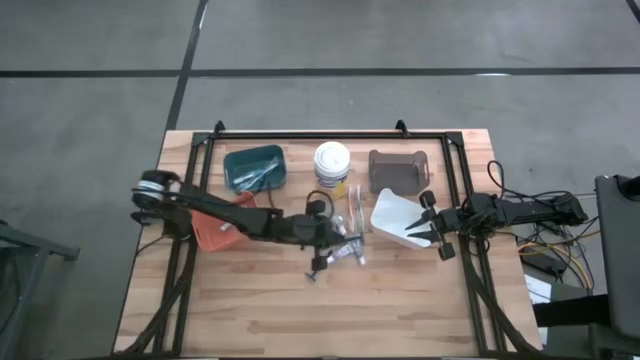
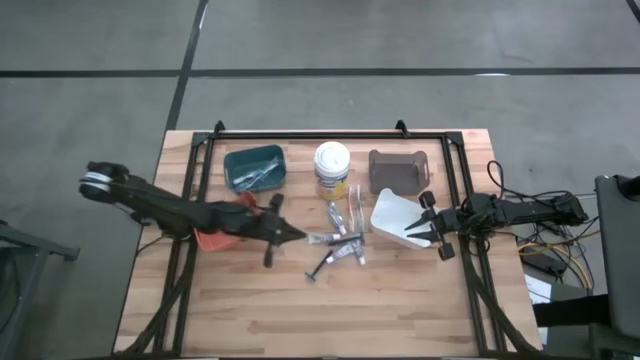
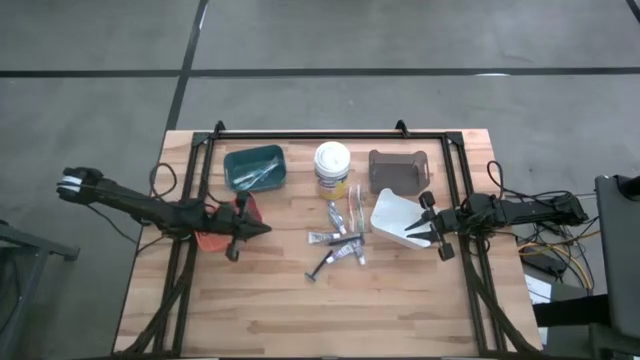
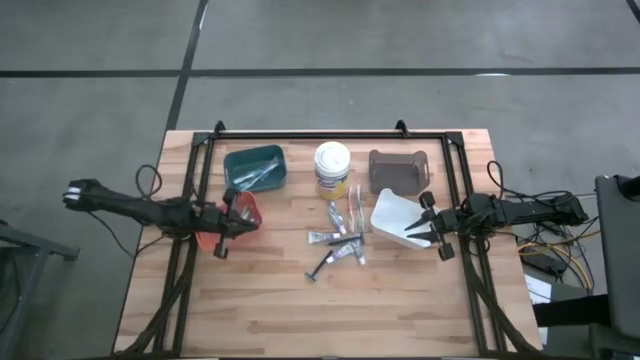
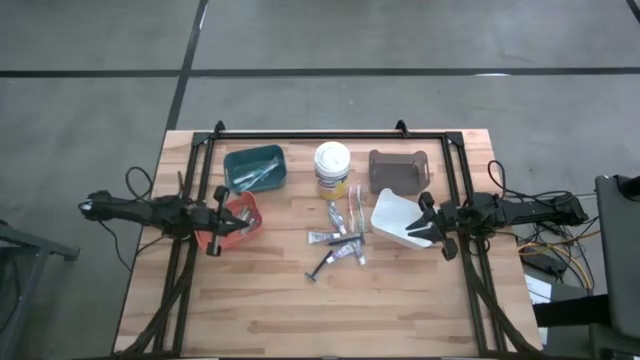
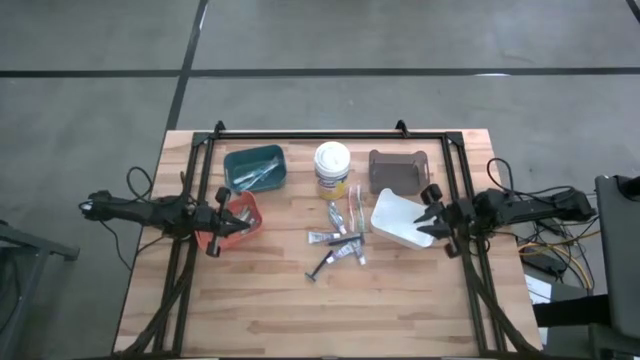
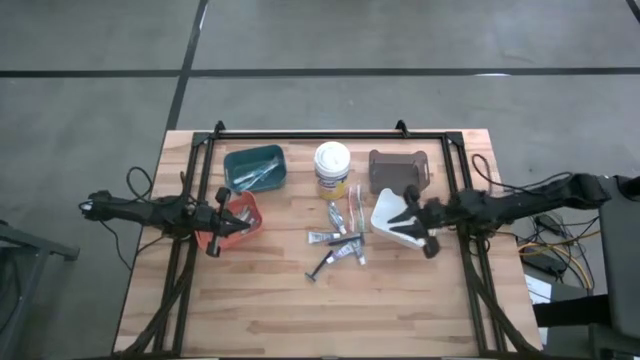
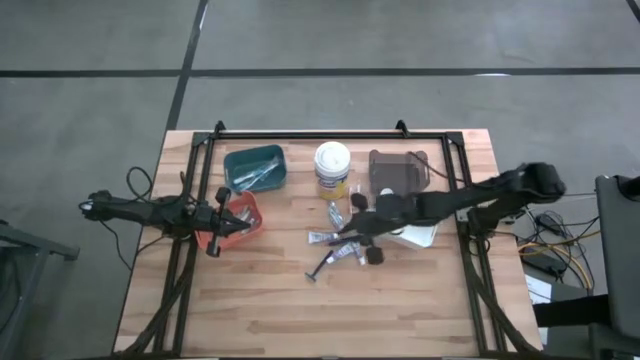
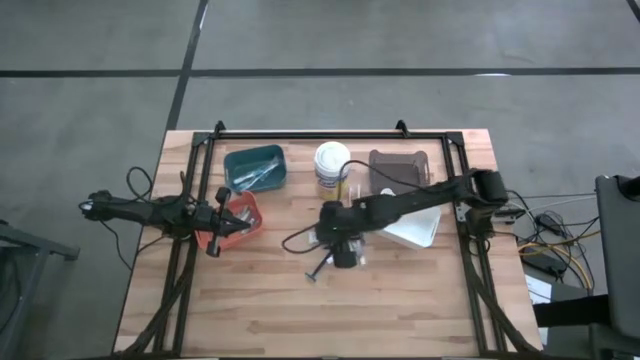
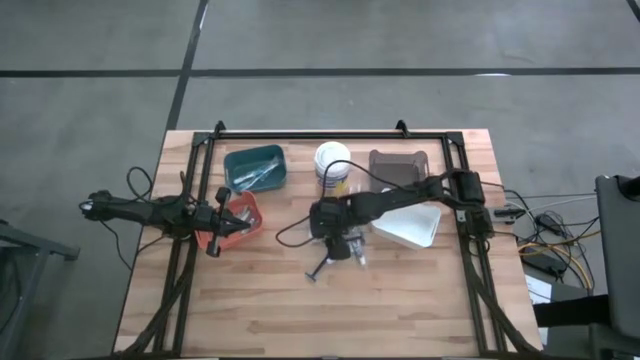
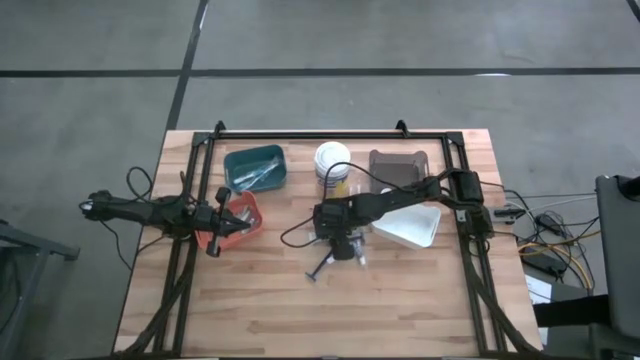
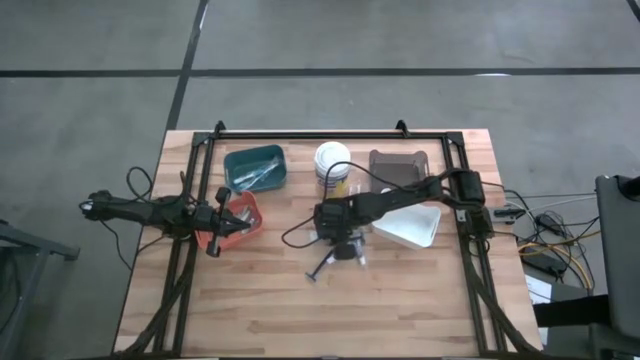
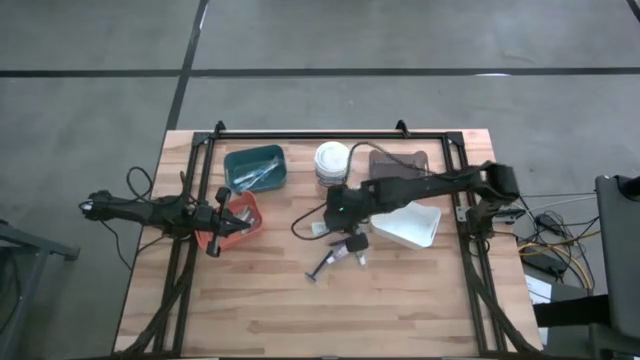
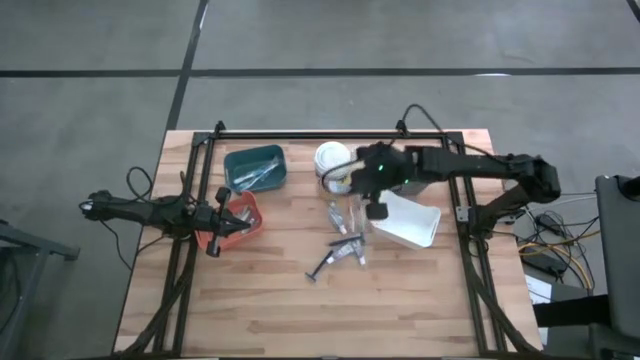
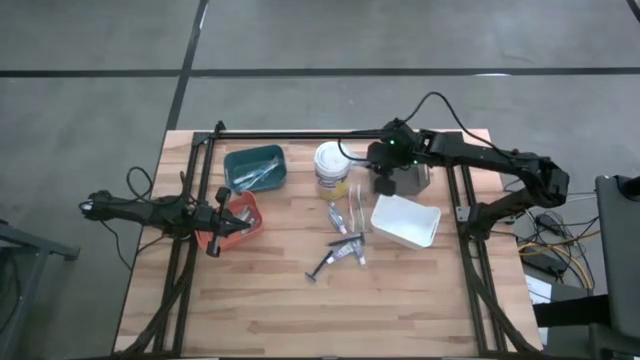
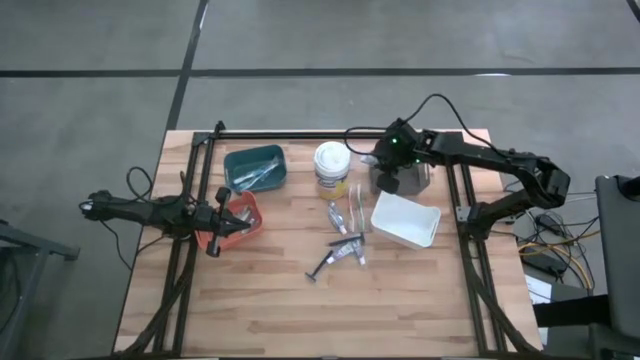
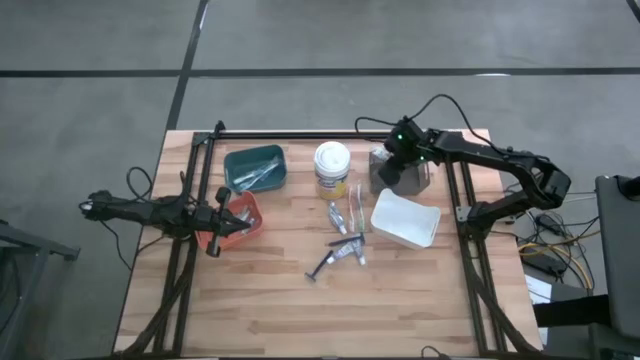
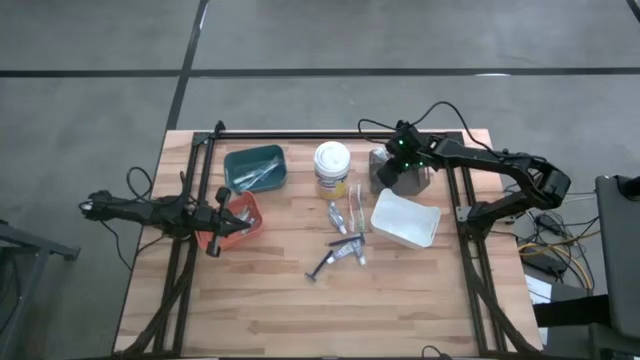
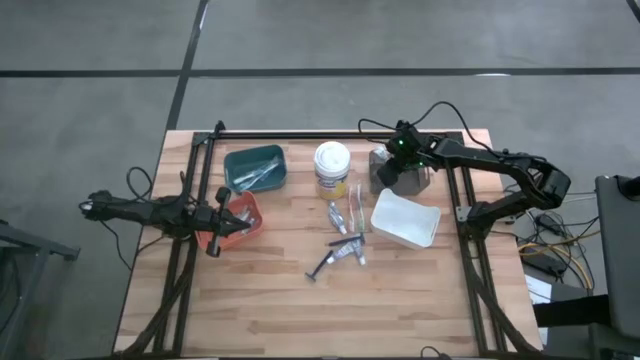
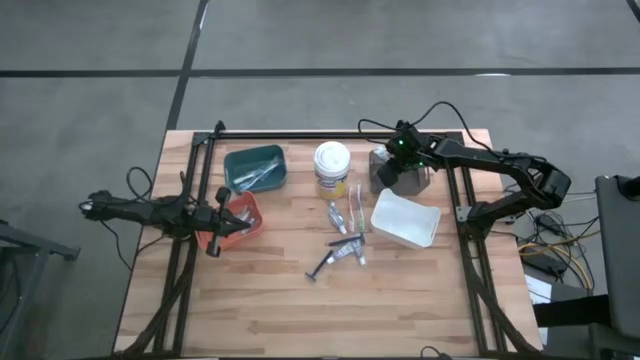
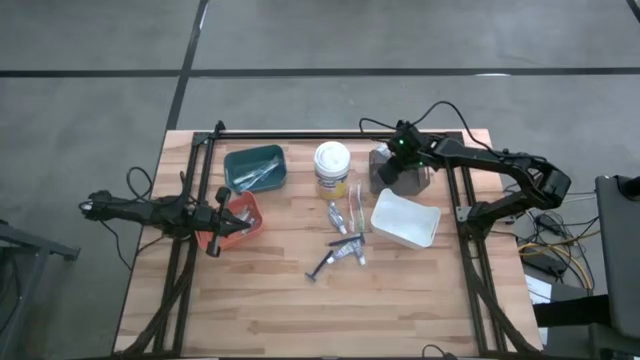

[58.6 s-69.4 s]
Task: Pick & Place Travel size toiletries
Put the toothpaste into the black bin

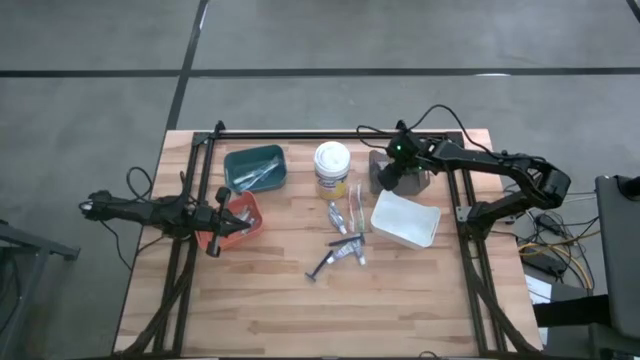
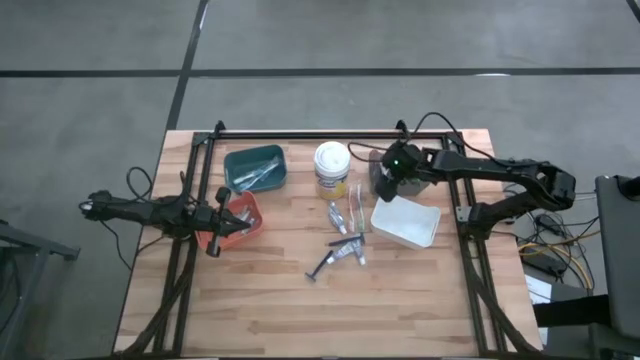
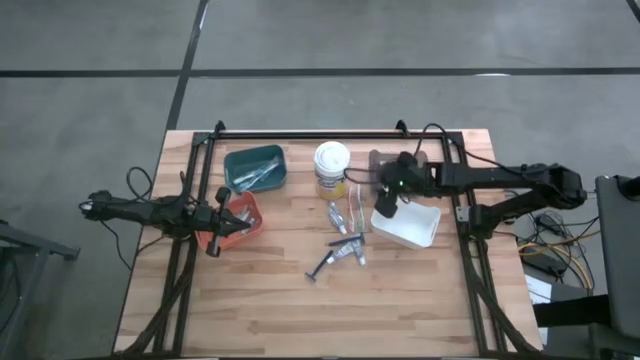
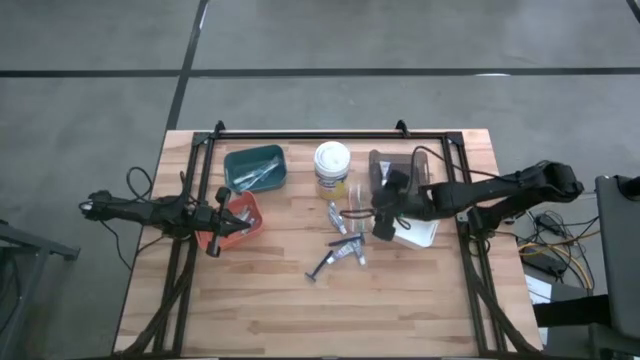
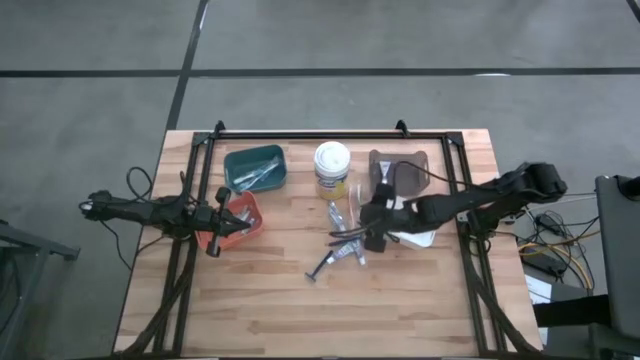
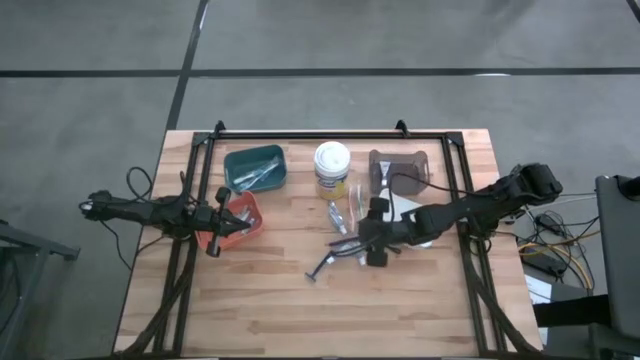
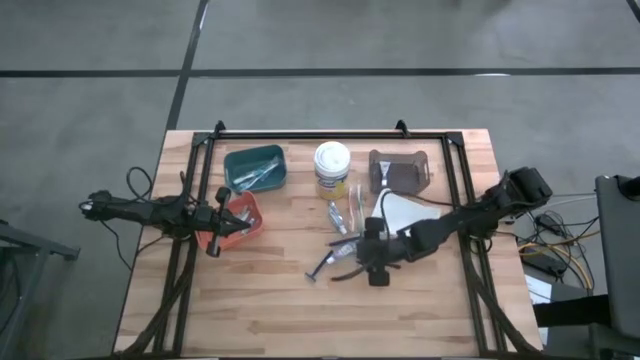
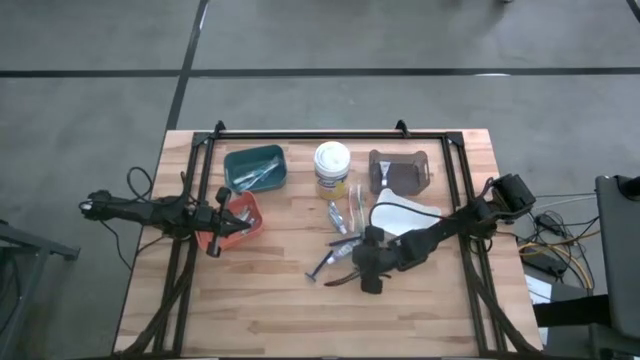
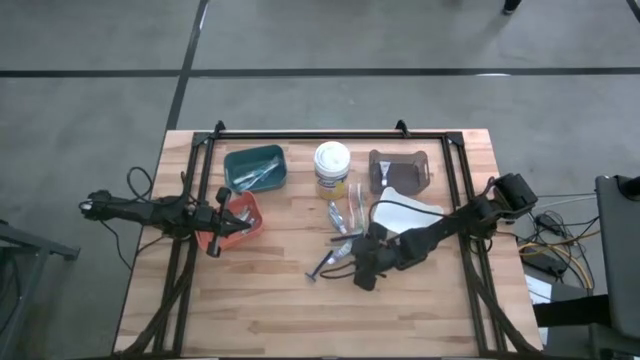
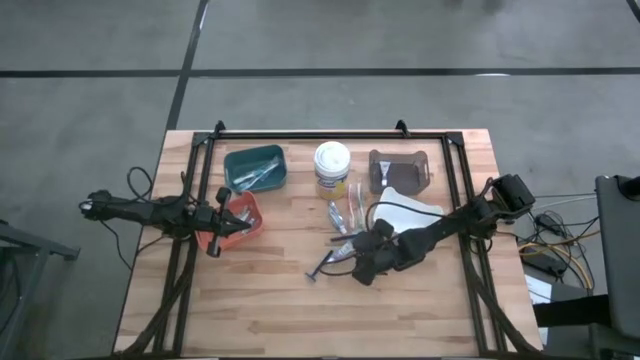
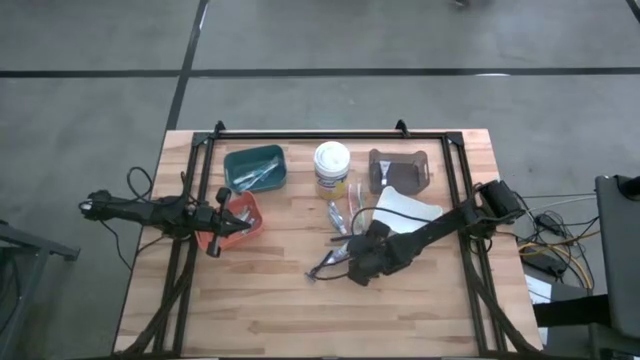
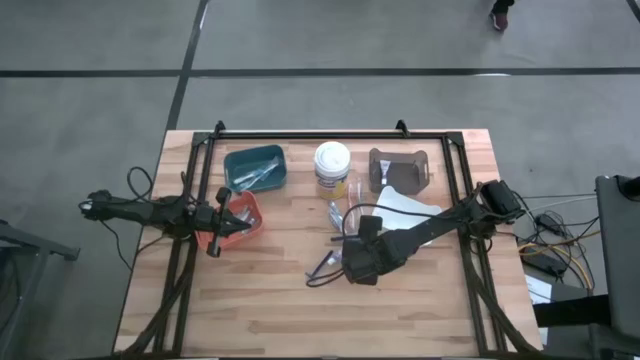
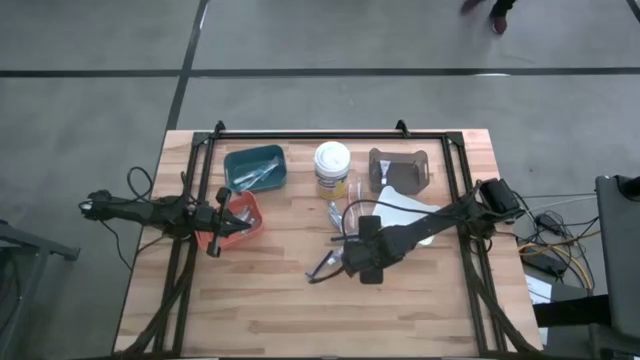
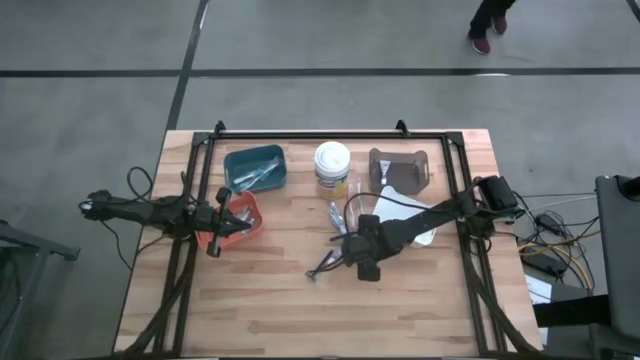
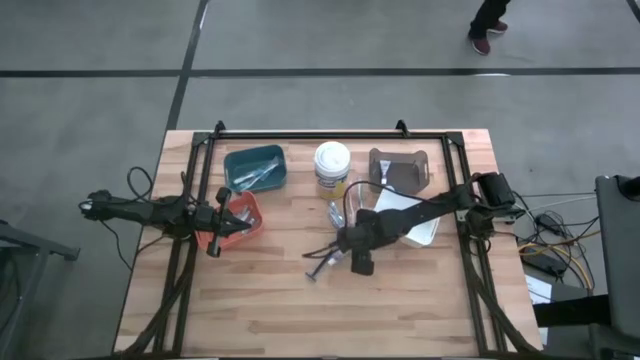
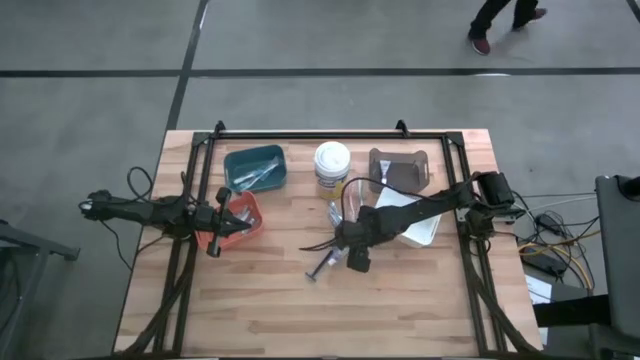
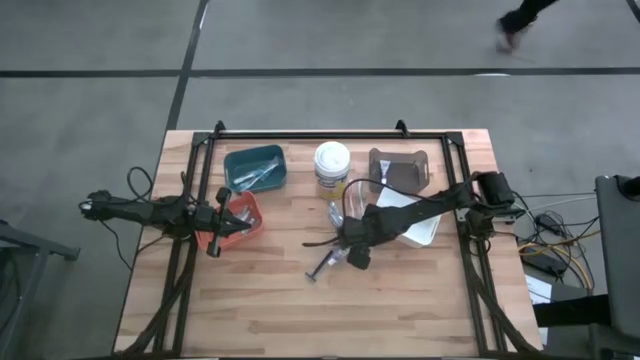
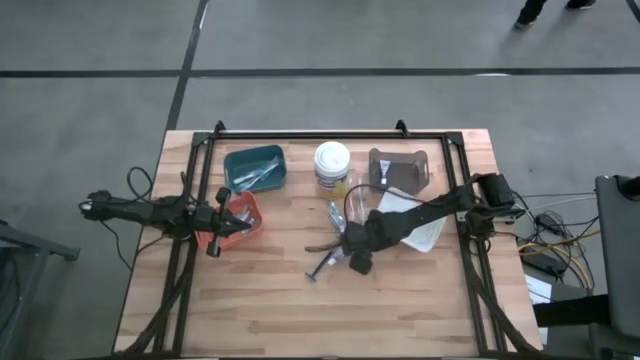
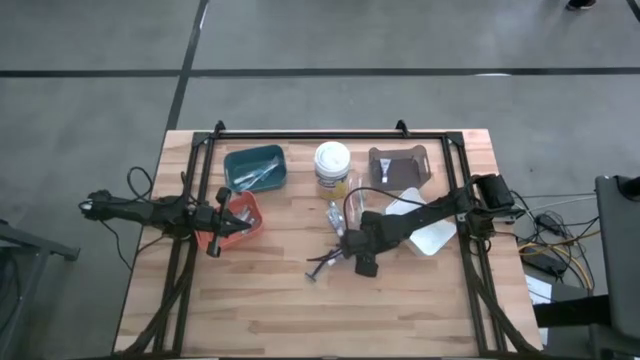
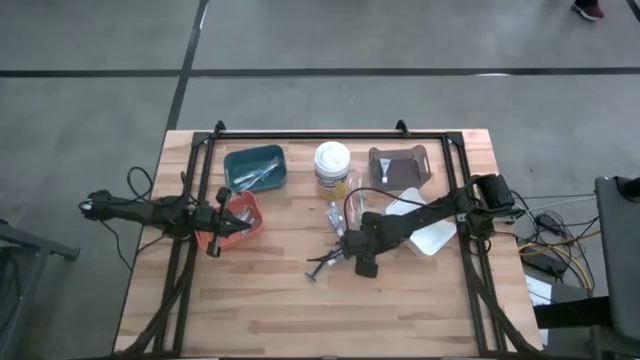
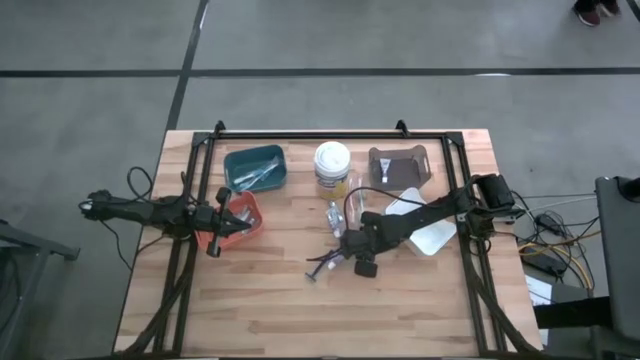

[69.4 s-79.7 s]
Put the top razor into the white bin
